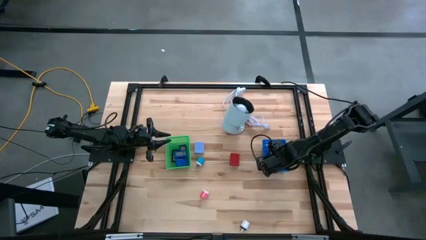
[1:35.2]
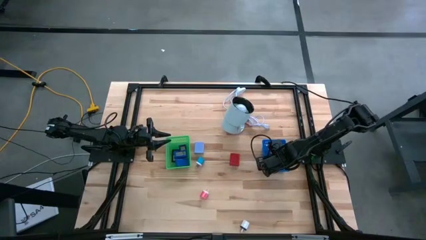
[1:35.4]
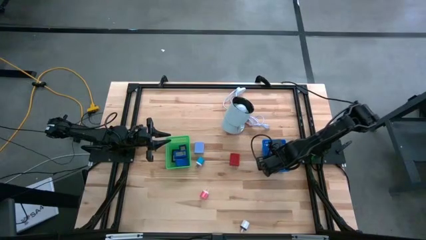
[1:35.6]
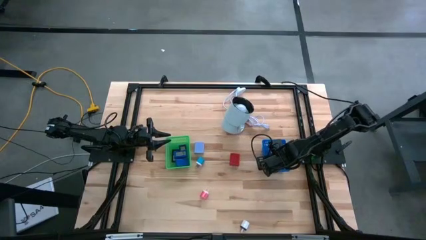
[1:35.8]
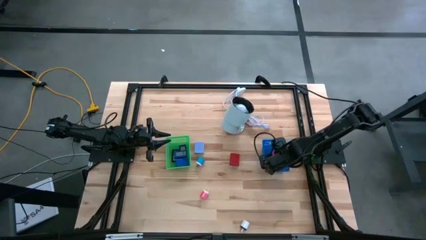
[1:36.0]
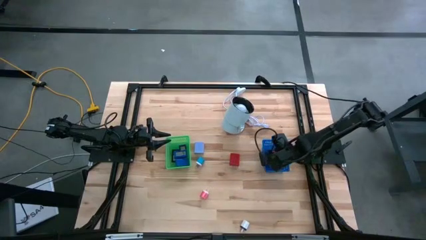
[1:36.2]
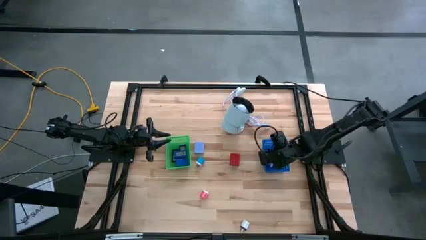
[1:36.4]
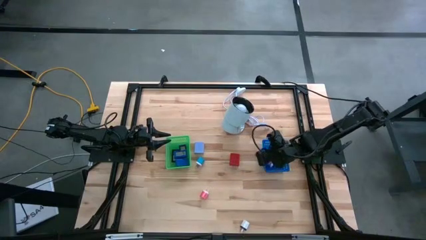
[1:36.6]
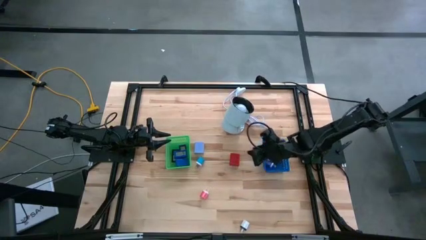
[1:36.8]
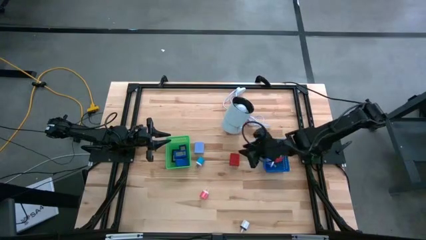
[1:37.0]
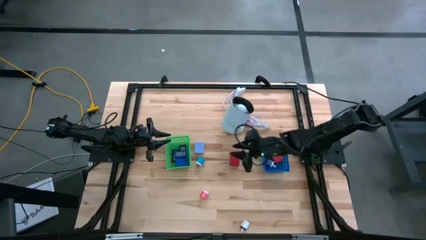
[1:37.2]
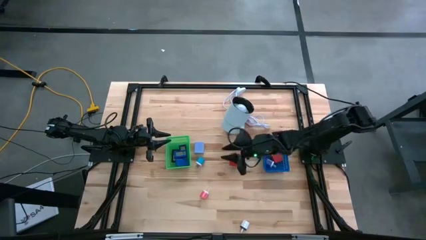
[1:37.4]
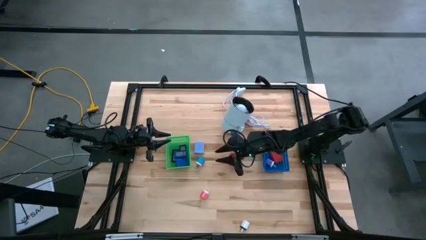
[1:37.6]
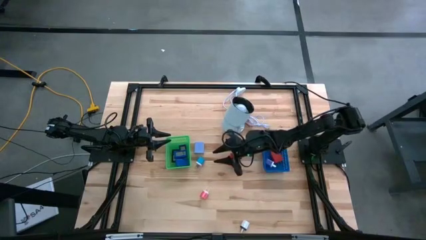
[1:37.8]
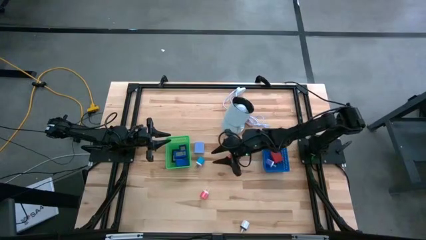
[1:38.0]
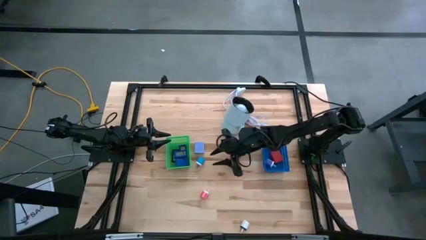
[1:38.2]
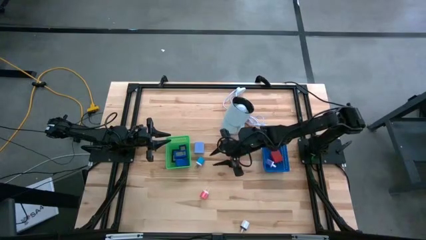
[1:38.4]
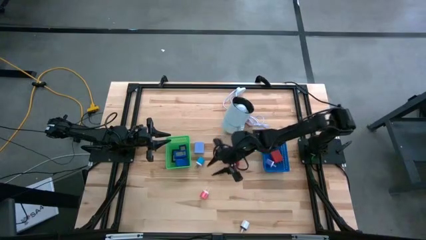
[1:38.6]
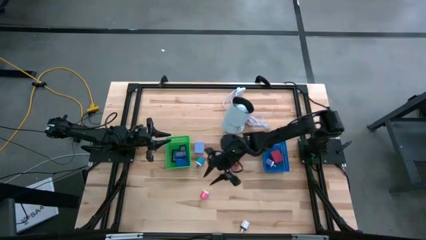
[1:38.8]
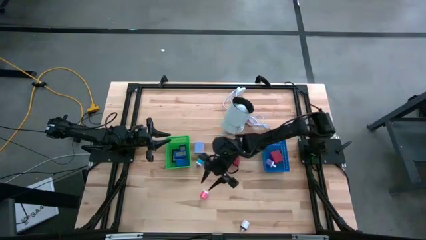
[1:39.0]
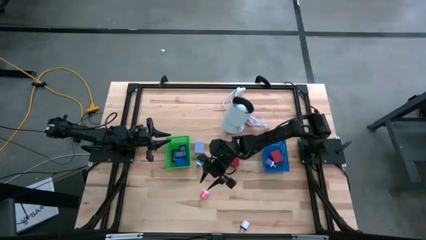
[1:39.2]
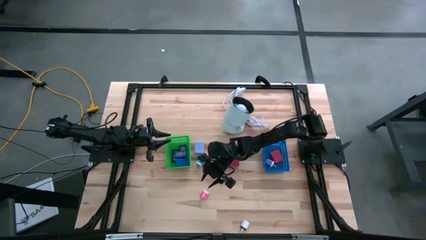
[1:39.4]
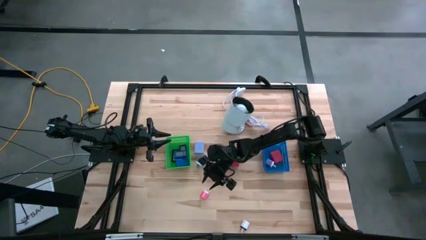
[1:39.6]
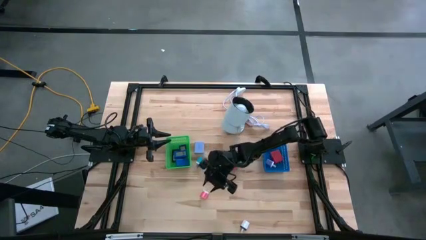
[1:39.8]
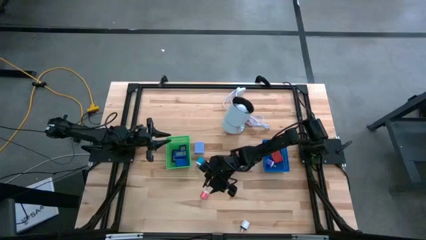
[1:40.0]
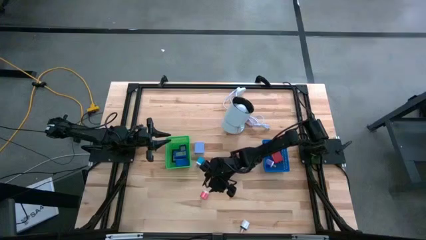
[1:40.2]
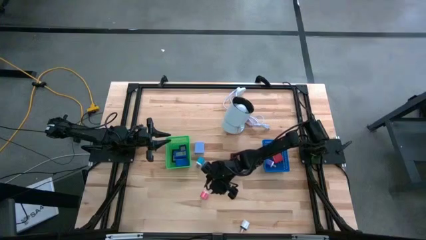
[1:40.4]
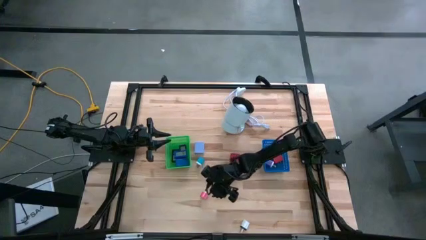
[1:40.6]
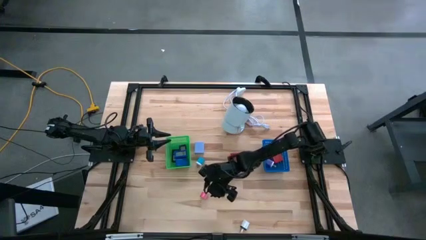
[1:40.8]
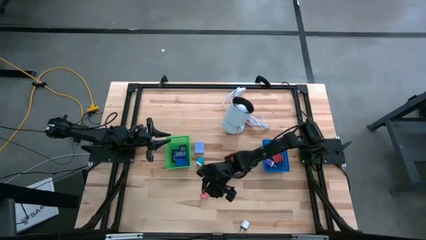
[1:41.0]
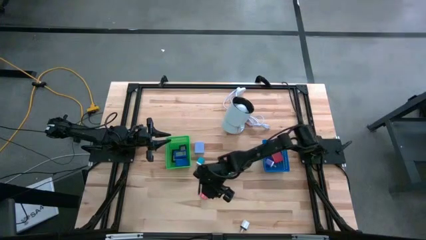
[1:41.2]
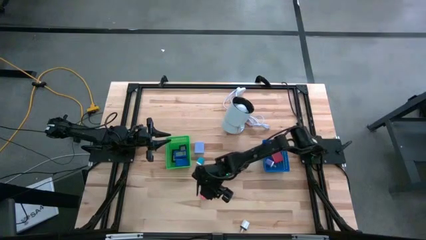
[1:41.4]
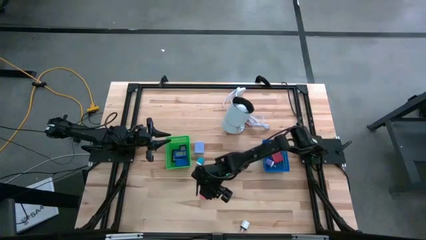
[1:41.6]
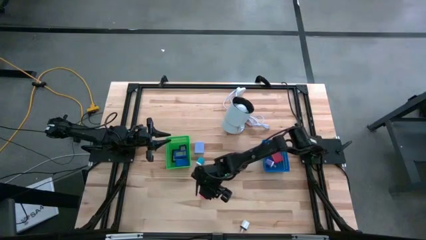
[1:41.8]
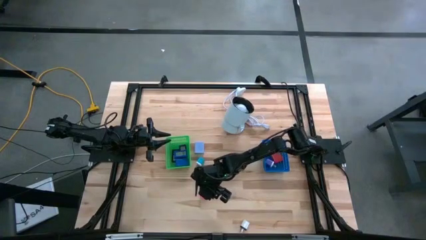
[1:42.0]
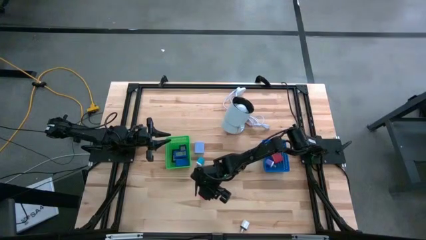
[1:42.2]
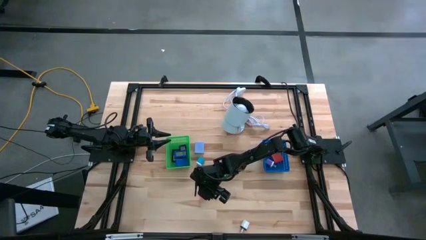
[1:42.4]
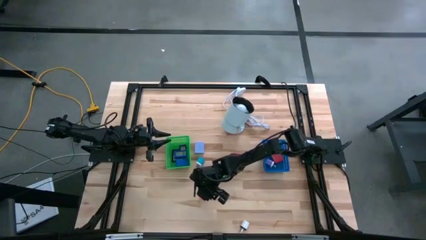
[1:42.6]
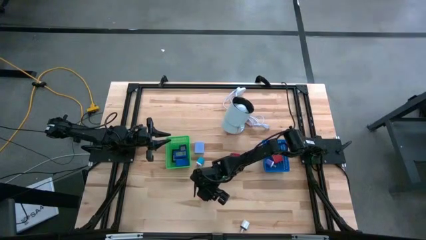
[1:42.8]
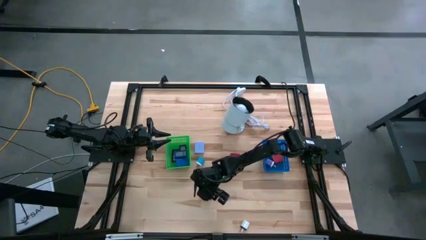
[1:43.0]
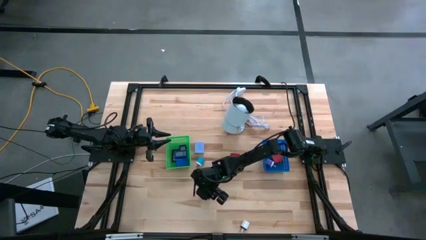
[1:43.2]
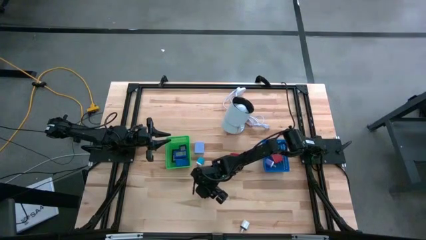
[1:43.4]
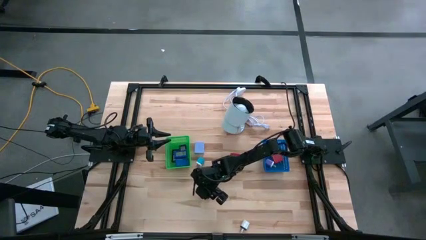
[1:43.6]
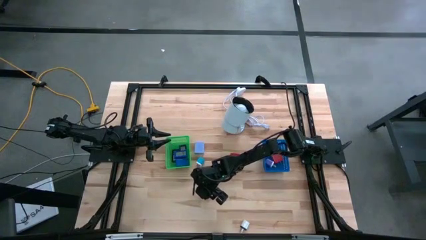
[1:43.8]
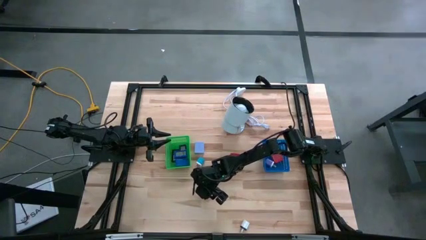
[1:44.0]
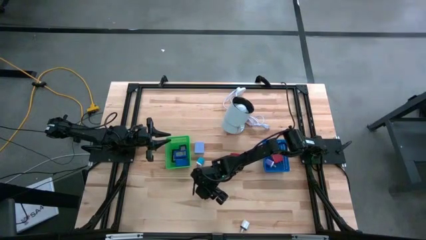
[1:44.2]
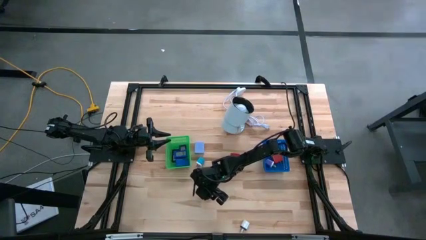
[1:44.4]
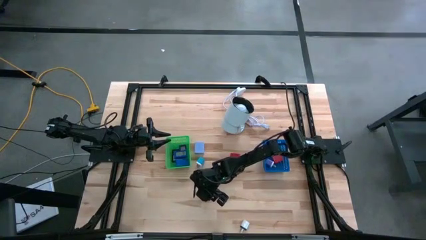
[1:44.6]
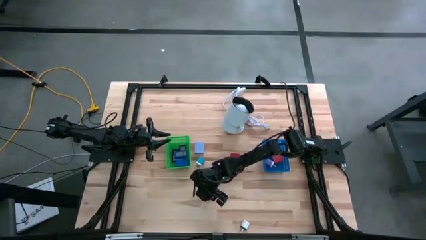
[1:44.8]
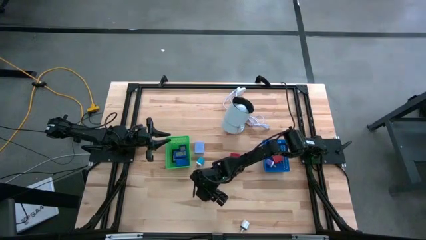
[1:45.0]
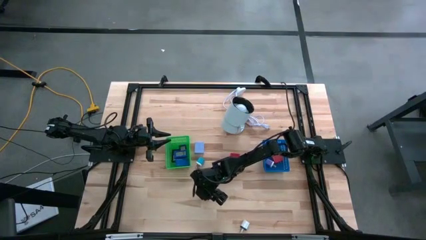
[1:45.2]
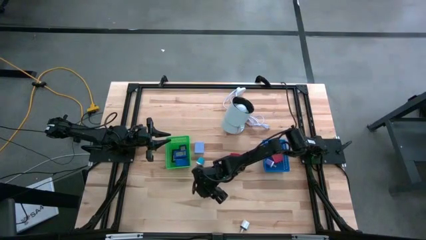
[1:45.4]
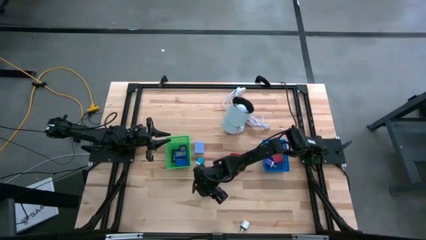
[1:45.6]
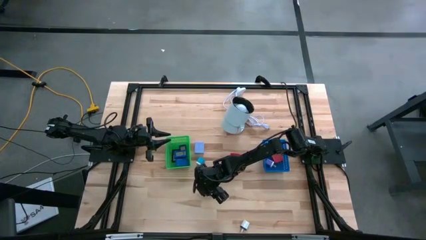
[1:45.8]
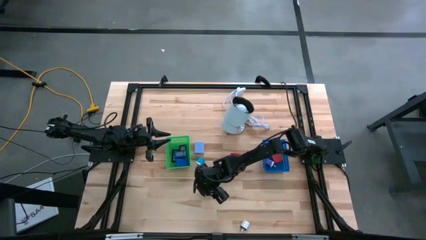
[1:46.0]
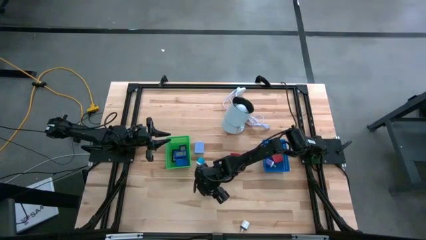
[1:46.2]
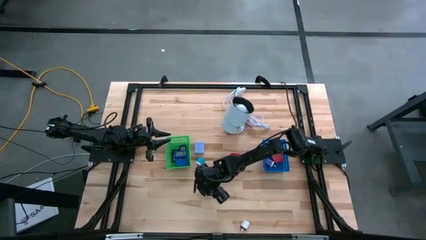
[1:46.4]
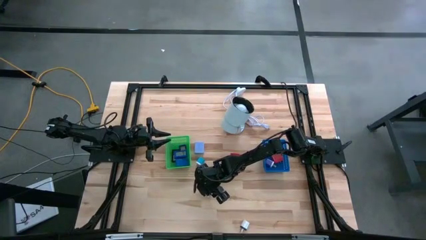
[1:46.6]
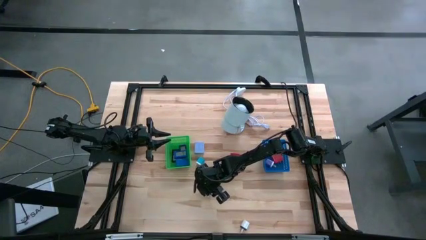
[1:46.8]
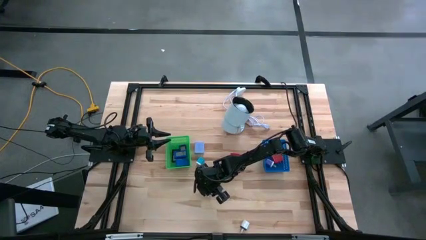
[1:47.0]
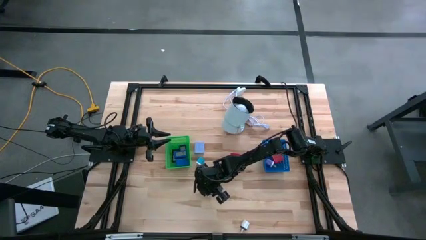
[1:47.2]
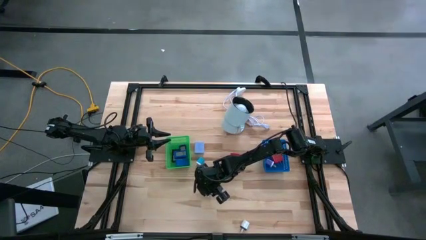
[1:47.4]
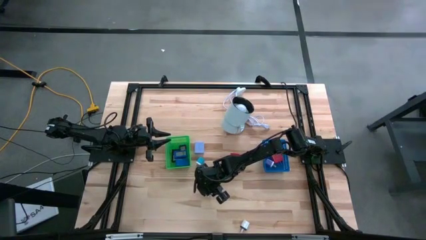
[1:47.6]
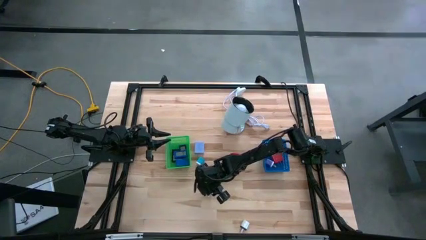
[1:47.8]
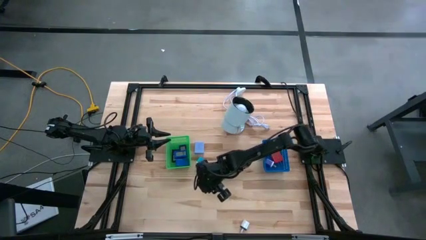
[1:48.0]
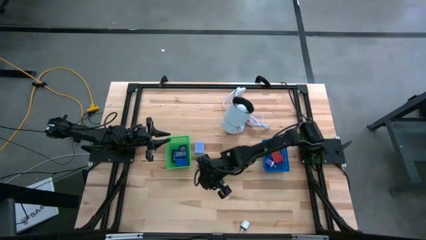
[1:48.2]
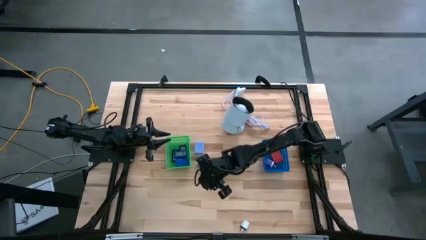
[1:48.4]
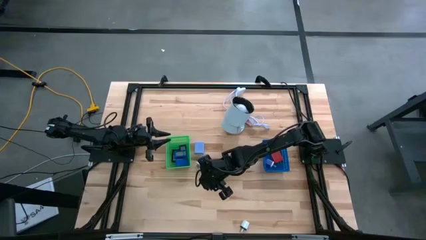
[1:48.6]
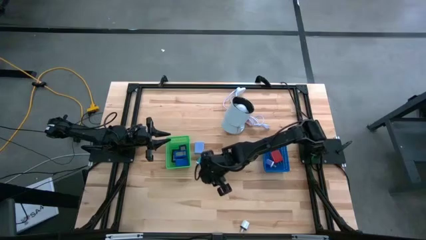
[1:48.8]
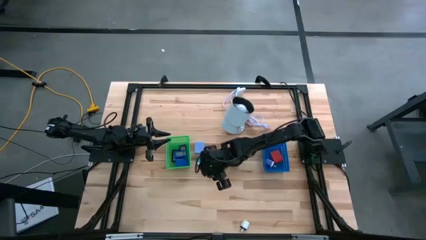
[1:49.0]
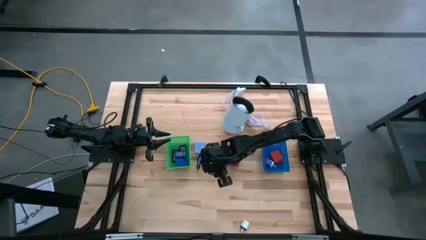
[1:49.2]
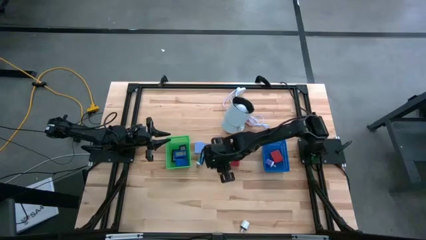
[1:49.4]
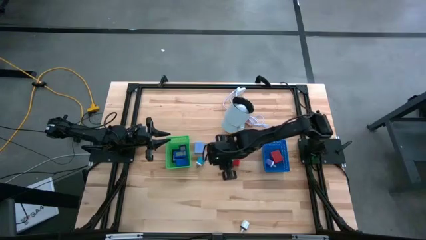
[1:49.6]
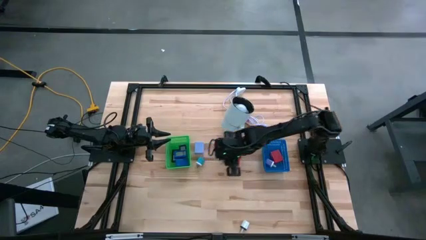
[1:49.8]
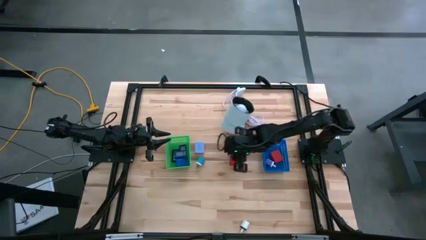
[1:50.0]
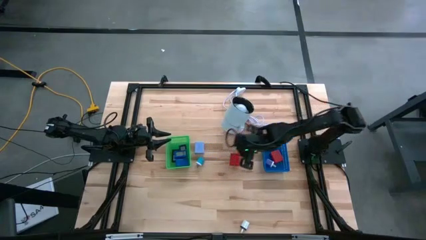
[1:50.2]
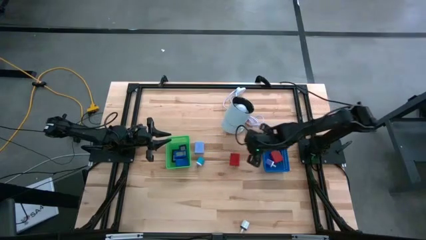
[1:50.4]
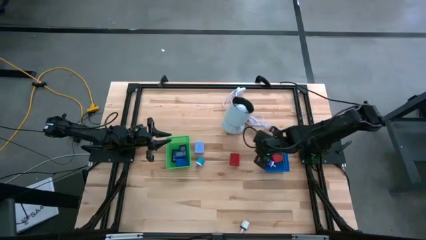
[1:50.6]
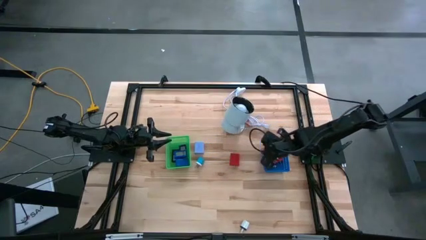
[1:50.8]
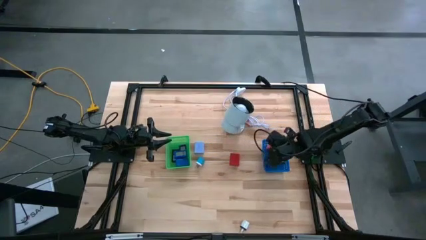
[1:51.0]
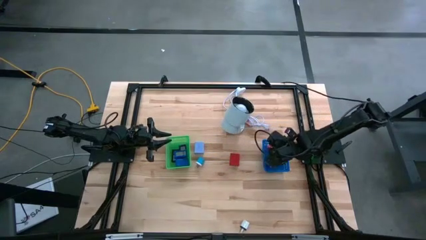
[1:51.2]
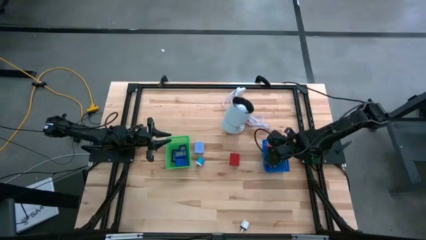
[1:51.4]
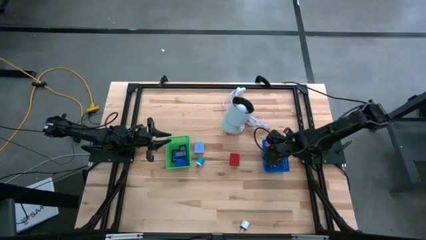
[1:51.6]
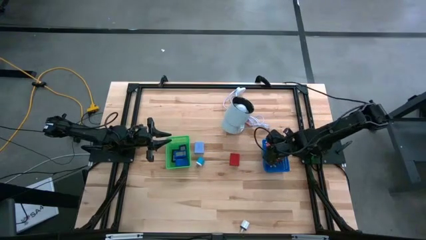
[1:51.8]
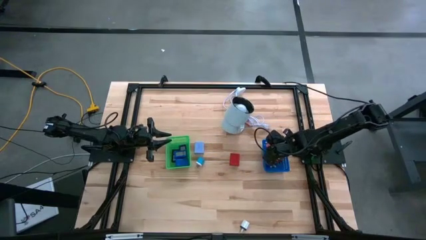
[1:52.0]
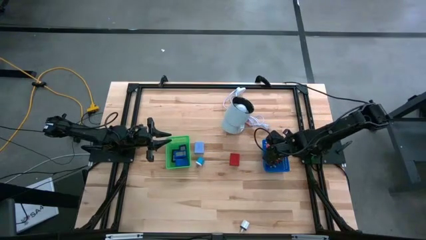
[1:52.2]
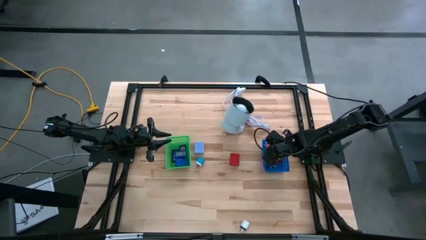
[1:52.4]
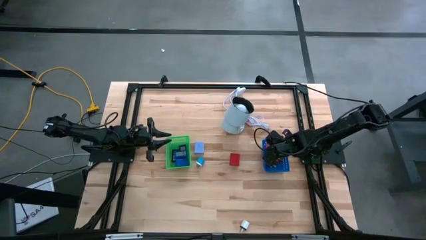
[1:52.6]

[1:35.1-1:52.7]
Task: Pick & Place Office items
Put the pink charger adapter into the blue bin
